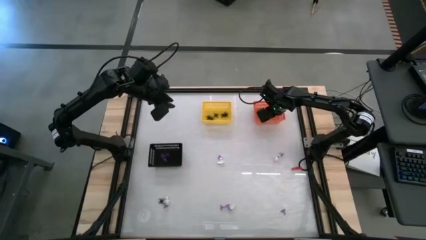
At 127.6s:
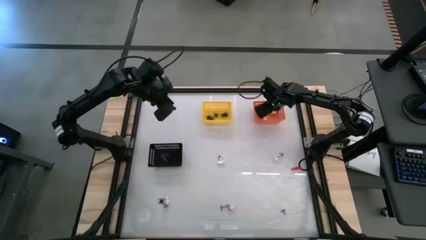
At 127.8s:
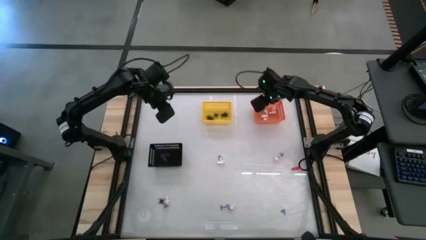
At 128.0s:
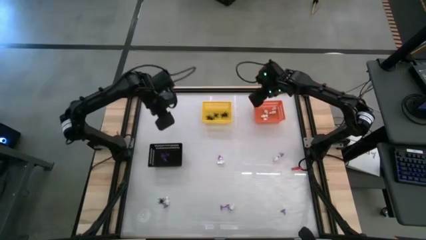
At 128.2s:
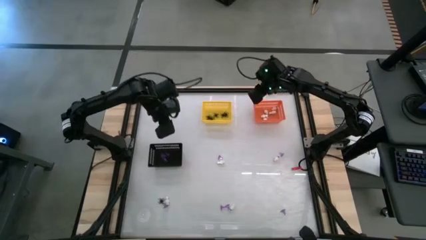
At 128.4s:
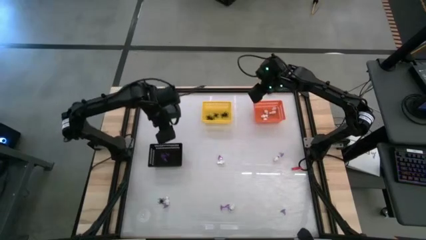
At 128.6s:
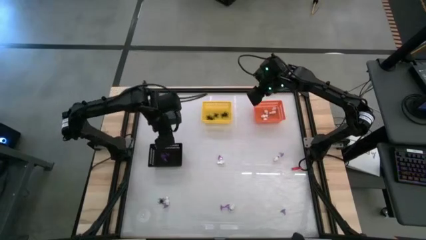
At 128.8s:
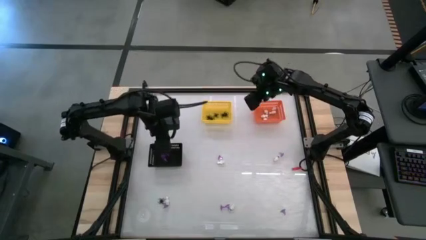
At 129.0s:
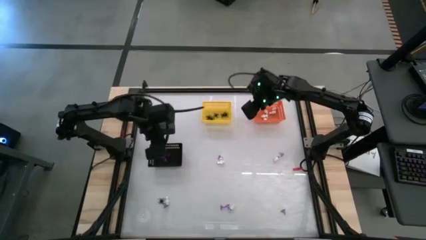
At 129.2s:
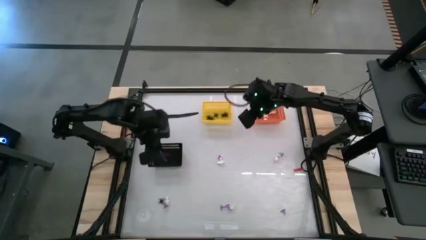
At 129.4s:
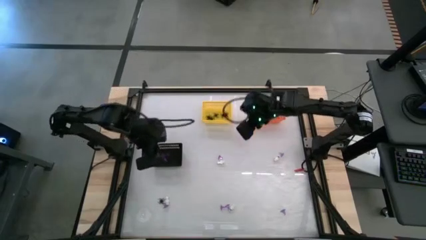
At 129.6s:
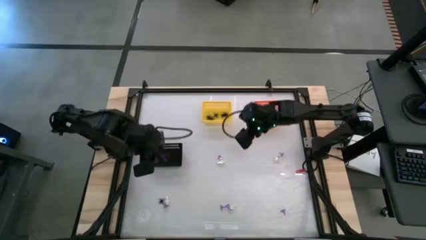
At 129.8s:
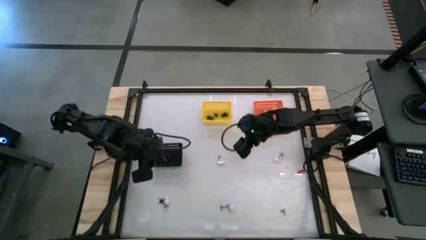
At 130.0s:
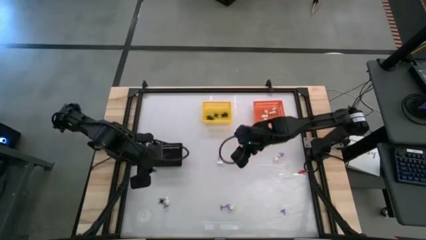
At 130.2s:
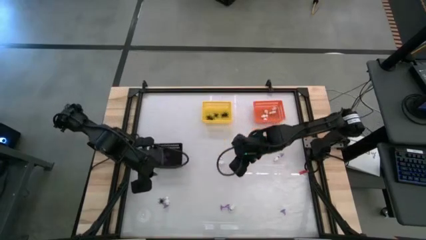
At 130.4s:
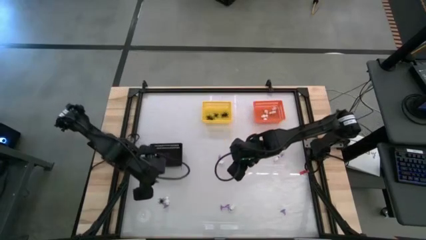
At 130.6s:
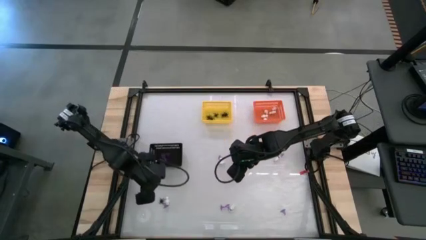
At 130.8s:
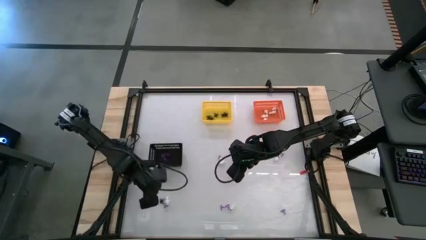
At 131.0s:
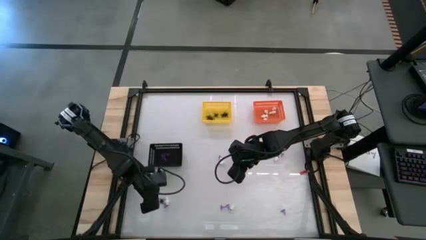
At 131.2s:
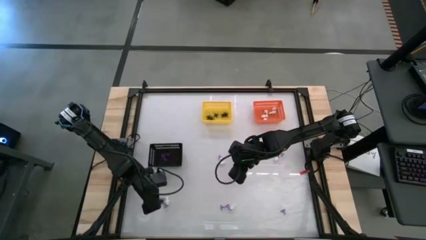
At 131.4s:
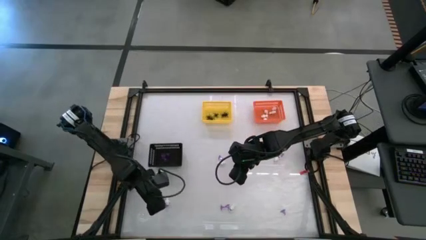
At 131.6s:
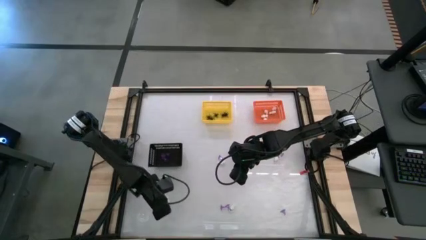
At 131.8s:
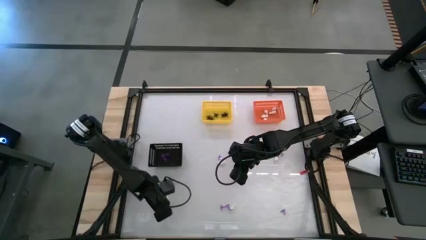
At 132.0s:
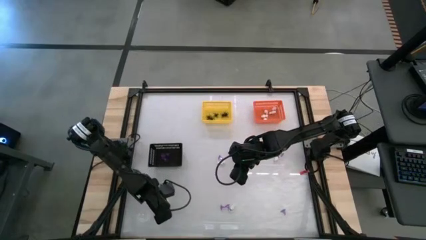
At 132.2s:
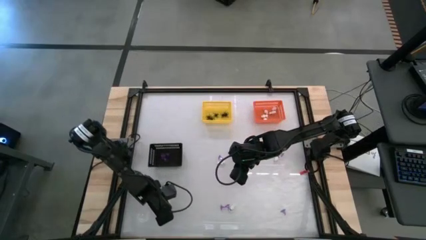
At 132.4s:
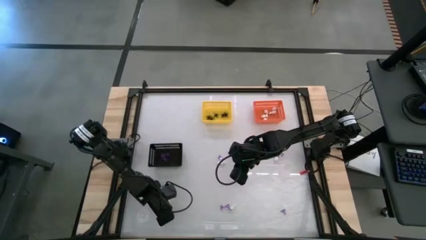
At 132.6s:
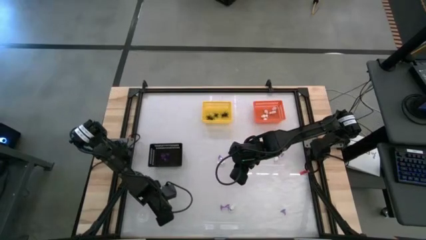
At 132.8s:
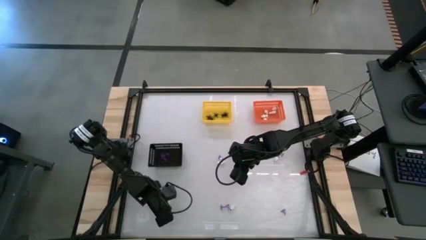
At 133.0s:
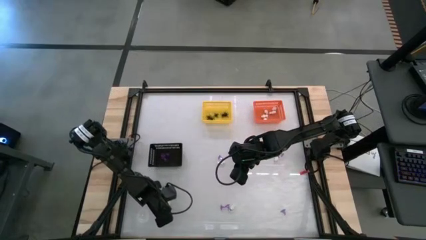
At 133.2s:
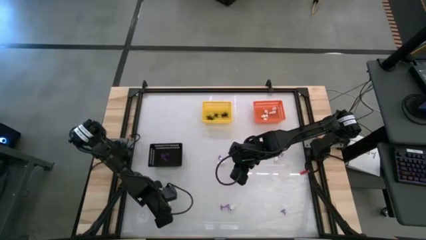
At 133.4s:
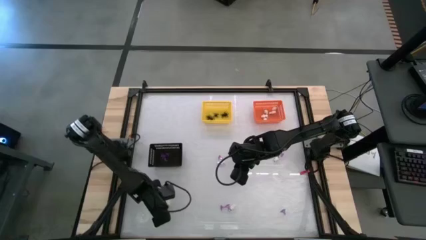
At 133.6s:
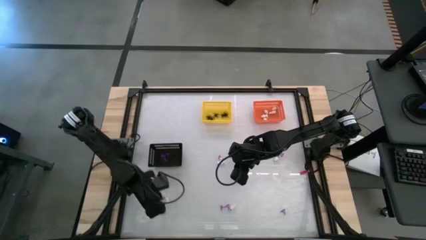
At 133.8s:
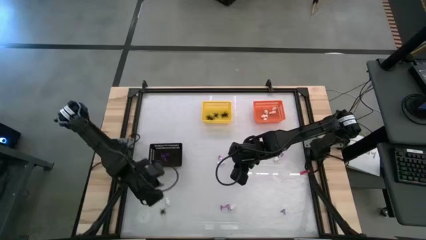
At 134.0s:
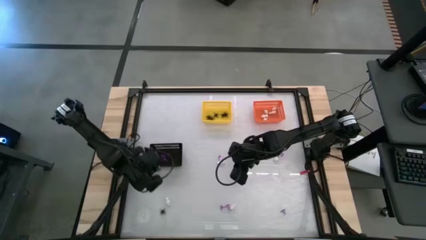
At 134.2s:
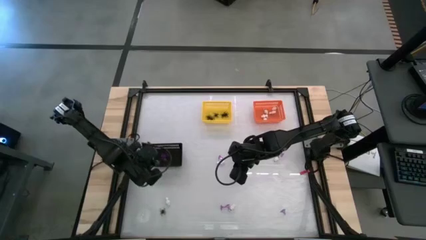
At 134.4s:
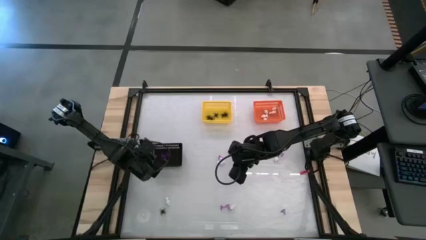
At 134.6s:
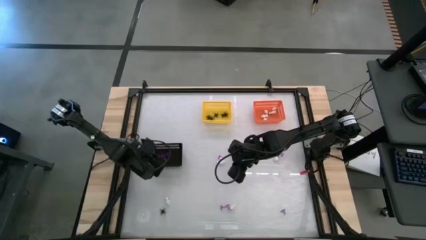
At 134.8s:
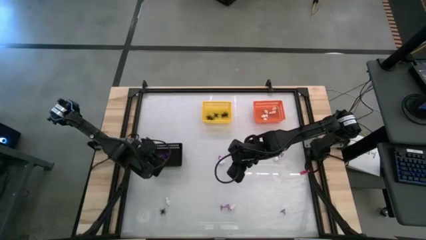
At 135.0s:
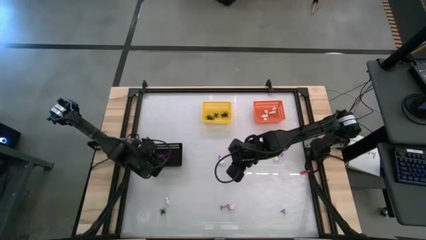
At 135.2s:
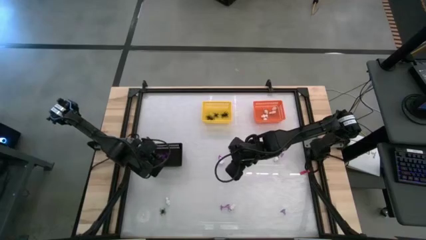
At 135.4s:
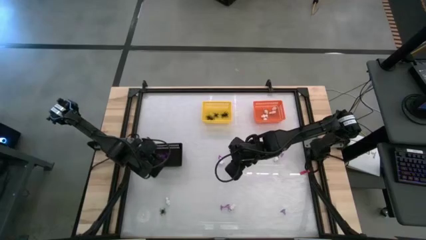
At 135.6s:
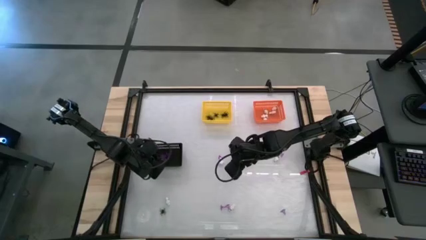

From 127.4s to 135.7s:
Task: Sort Halloween decoration
Put the purple hat toy into the black basket

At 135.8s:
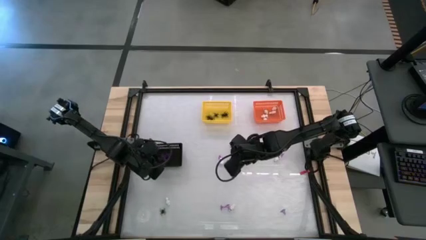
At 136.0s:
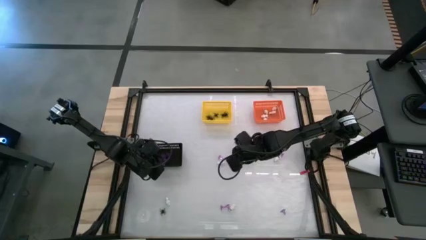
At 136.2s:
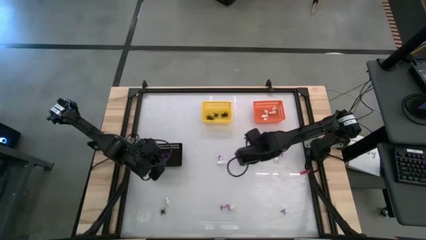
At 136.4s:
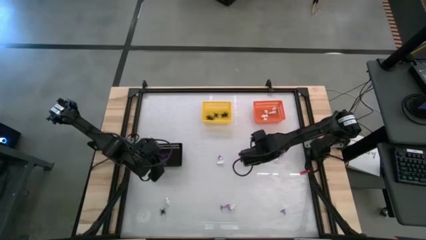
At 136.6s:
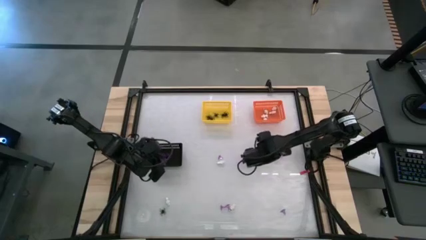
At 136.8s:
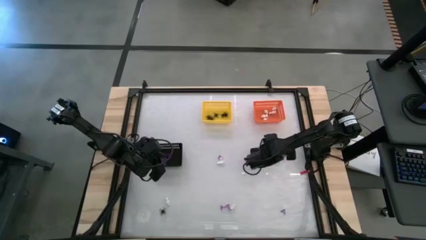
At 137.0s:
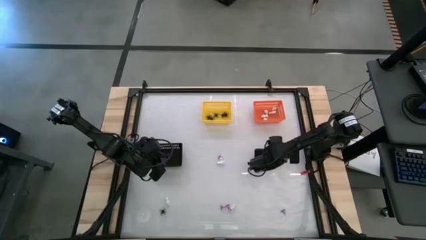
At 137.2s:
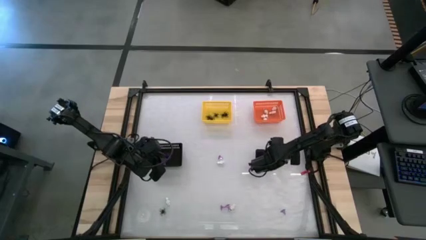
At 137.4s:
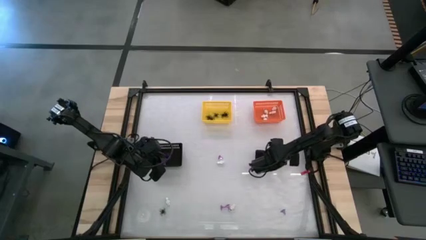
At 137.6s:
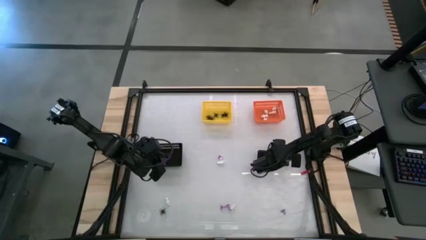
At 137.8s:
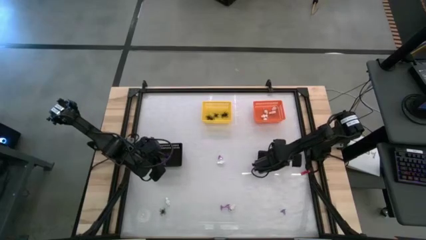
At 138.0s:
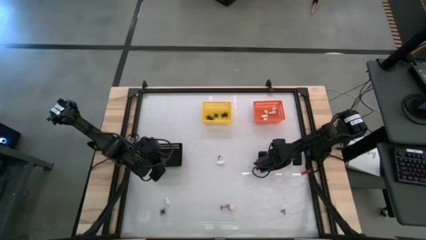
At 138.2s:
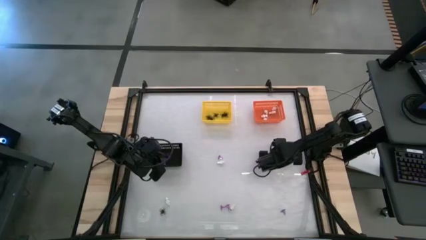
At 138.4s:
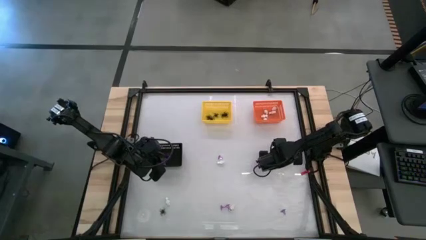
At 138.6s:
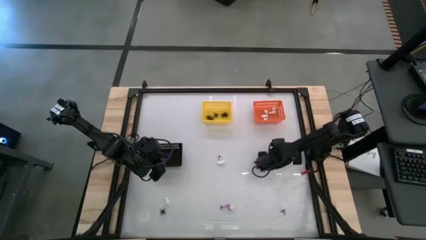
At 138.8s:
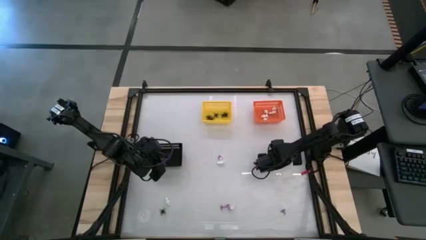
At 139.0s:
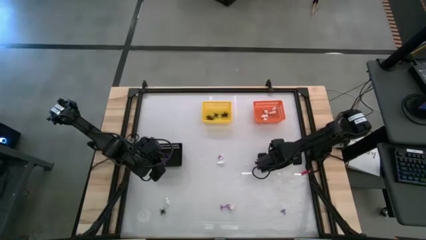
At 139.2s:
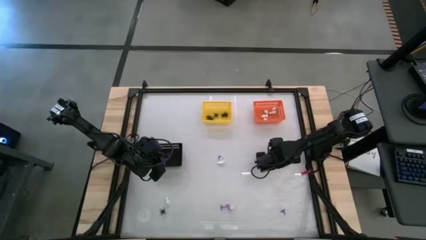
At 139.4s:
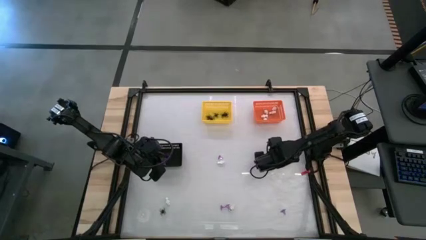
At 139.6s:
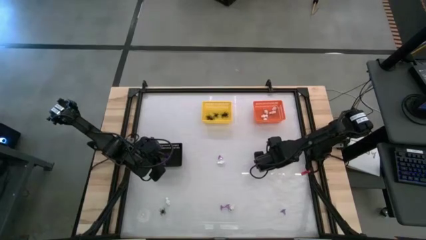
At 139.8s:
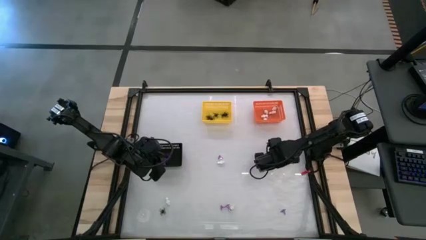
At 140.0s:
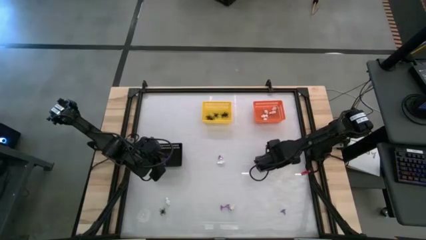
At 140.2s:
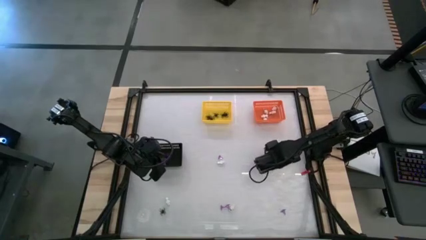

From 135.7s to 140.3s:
Put the white skeleton toy into the orange basket

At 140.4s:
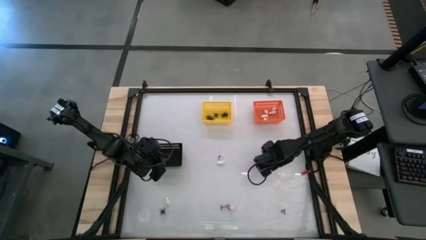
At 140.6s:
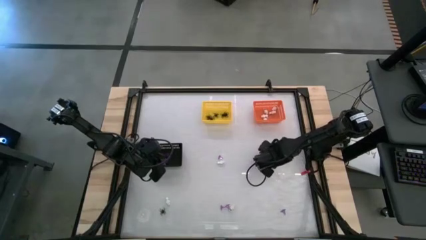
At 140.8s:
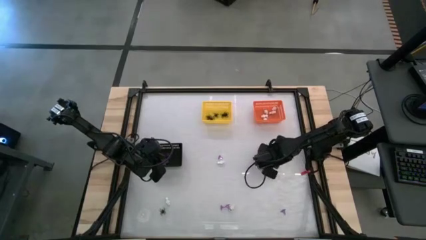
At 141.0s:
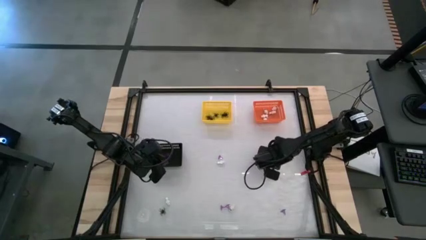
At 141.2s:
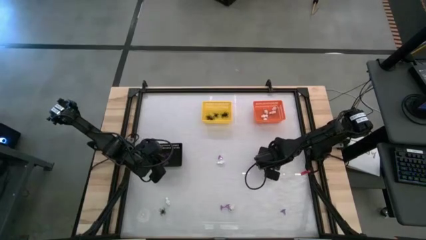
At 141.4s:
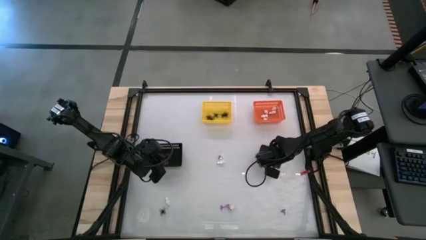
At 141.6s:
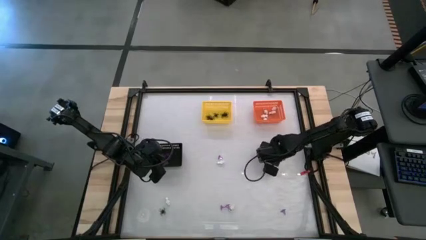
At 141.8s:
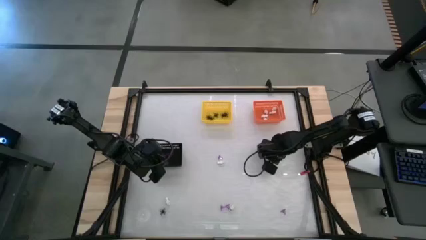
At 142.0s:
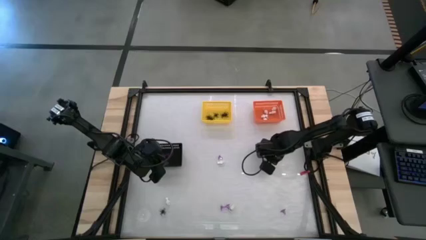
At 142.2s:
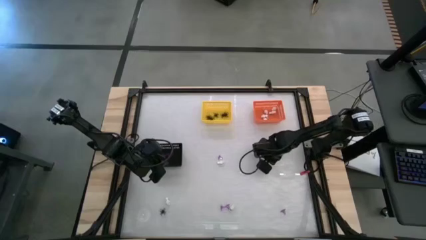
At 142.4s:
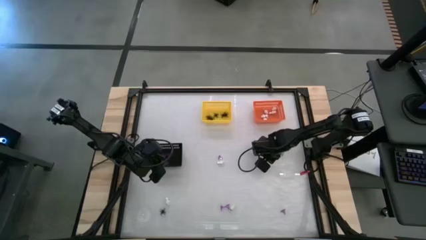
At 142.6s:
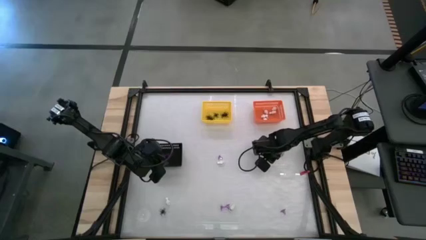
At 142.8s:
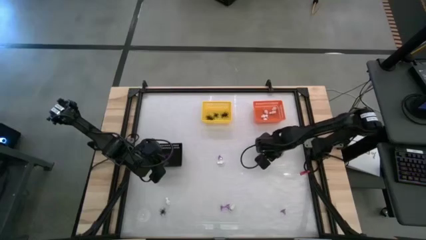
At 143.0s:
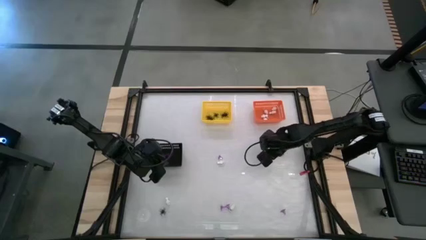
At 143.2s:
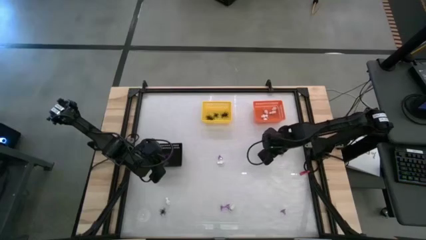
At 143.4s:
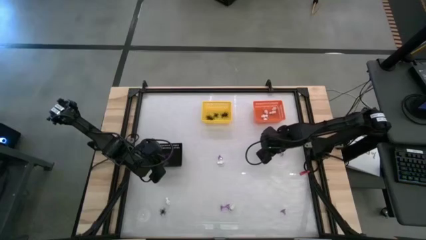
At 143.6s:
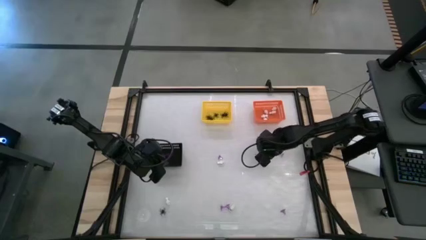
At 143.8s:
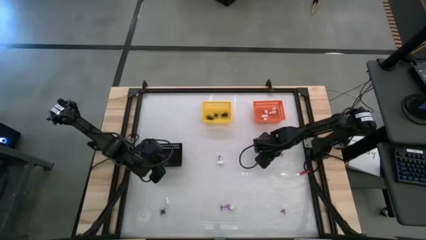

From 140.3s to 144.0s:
Put the white skeleton toy into the orange basket

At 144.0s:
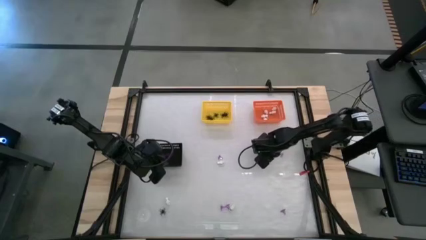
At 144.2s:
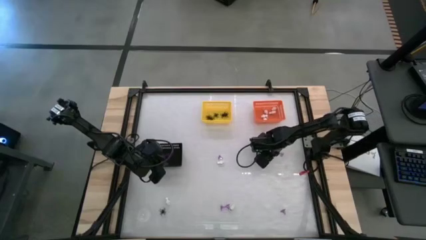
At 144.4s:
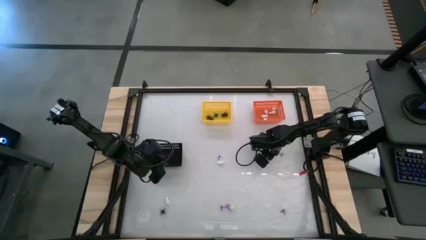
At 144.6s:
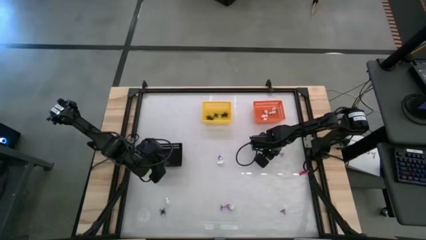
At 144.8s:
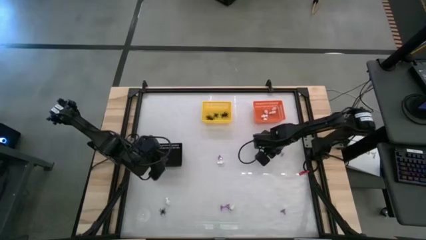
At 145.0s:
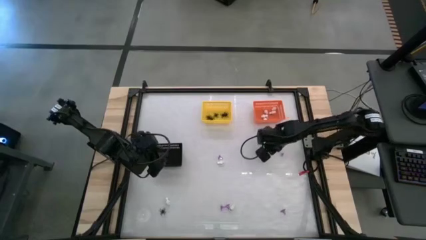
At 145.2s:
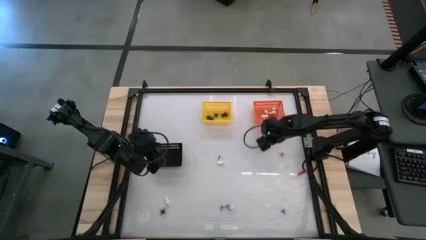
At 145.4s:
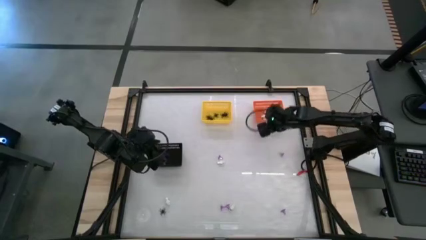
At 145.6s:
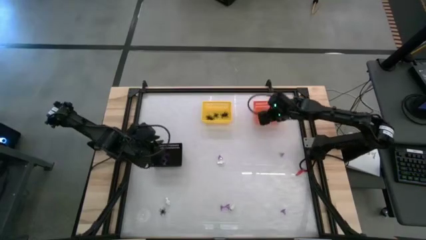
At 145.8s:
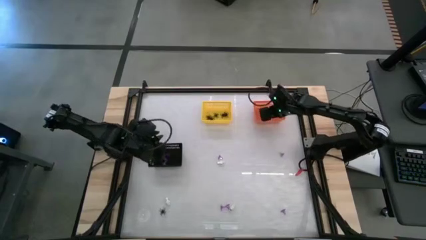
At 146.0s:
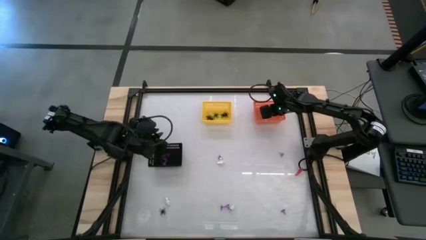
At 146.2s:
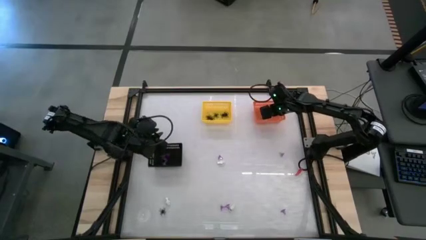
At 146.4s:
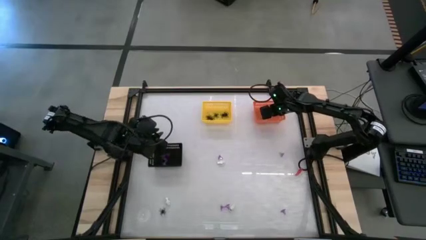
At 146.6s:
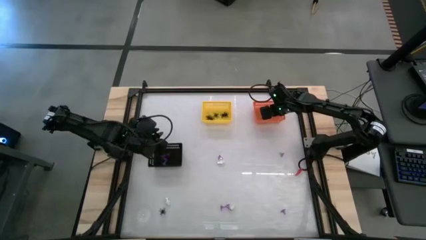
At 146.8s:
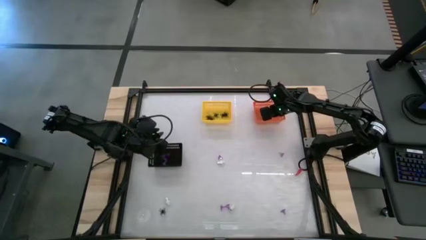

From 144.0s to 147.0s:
Put the white skeleton toy into the orange basket
